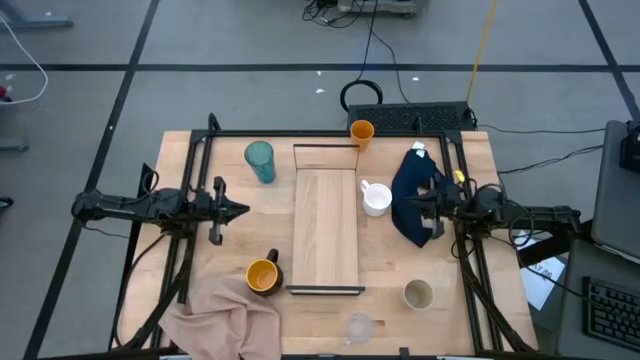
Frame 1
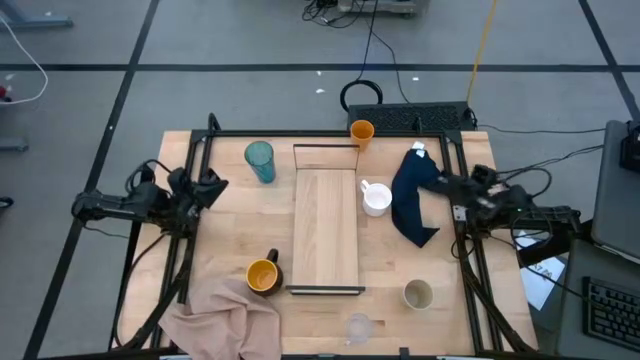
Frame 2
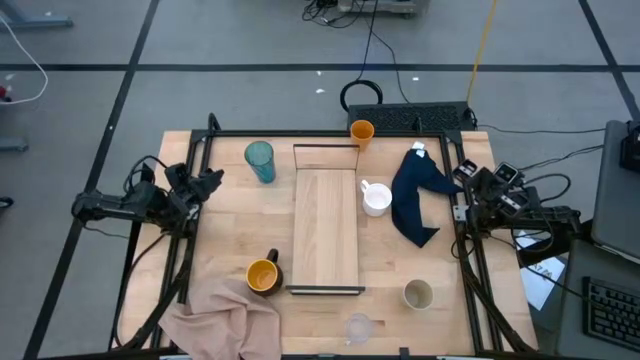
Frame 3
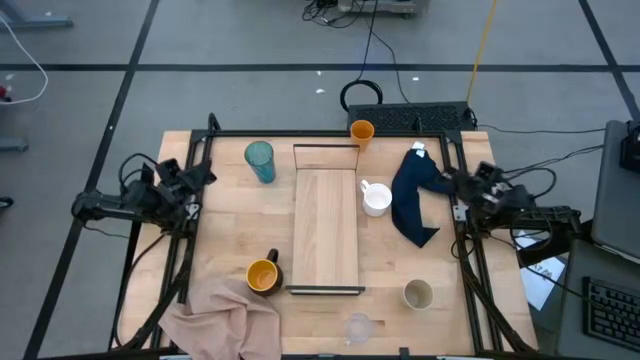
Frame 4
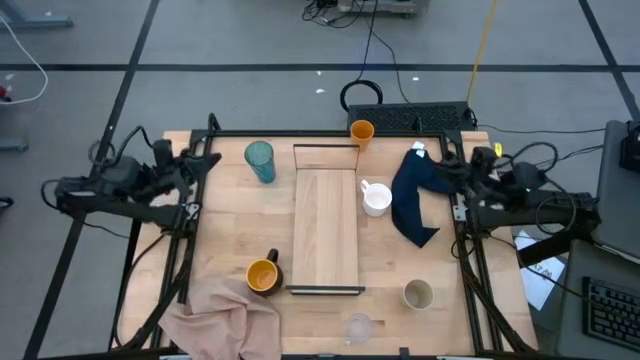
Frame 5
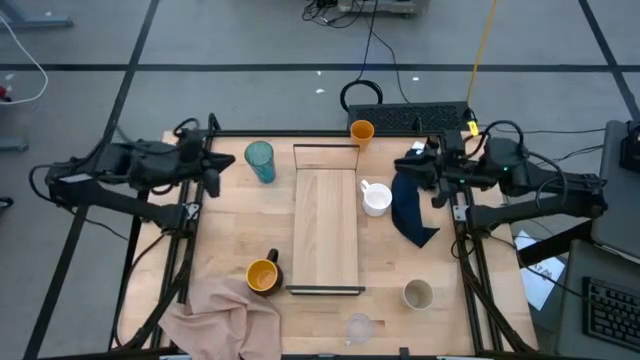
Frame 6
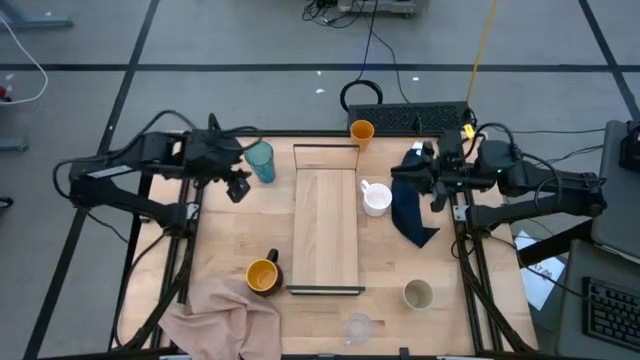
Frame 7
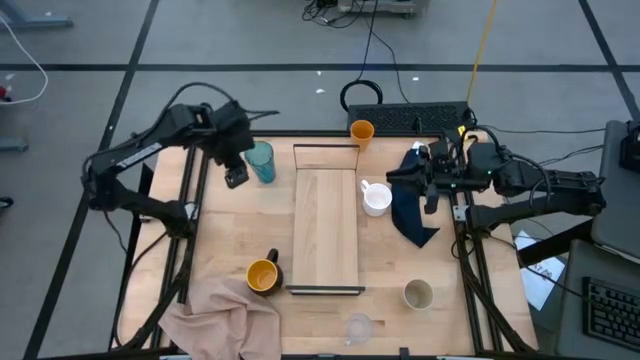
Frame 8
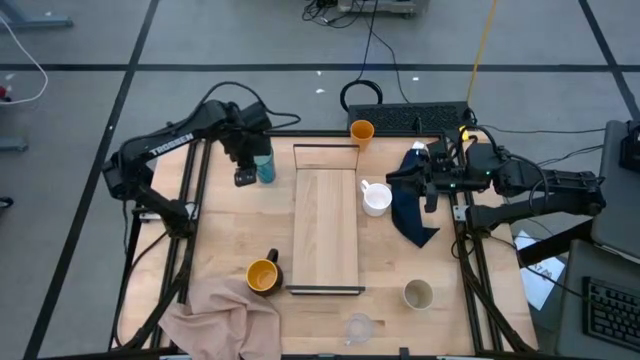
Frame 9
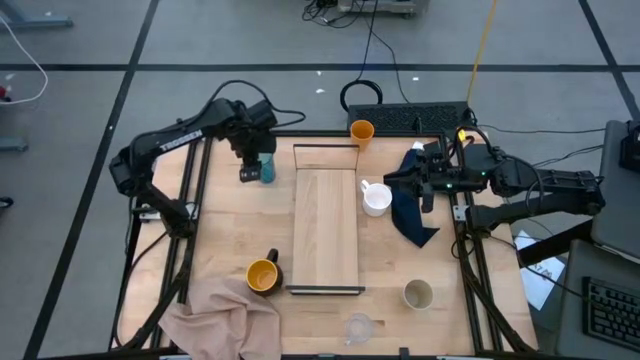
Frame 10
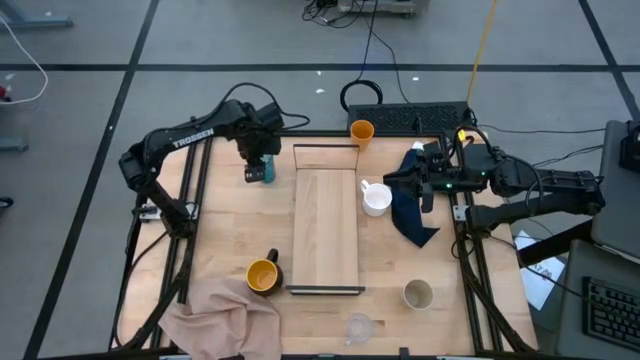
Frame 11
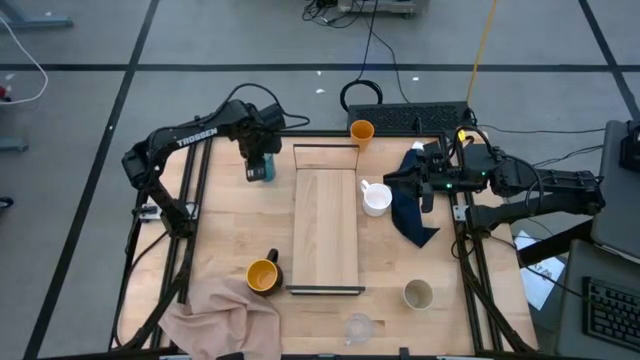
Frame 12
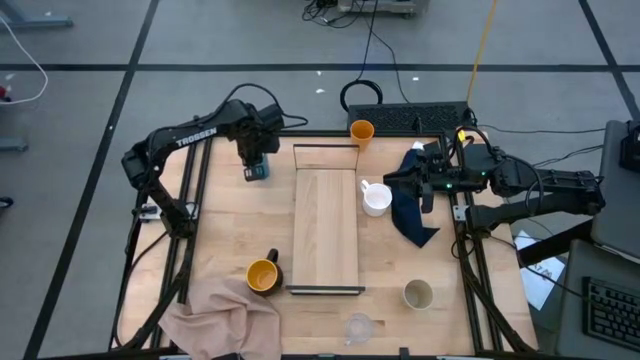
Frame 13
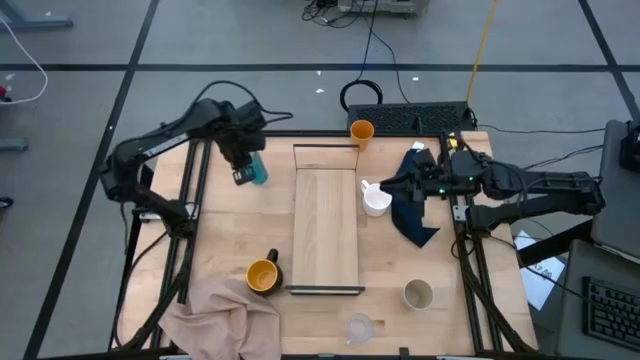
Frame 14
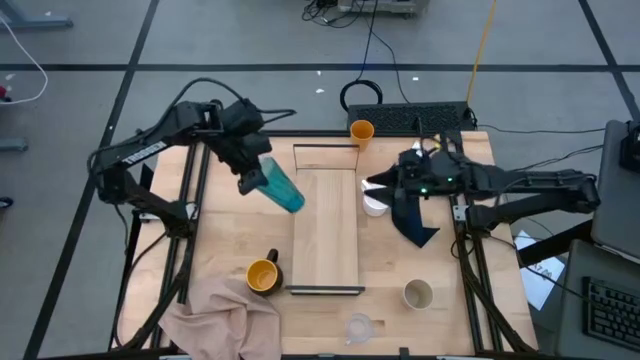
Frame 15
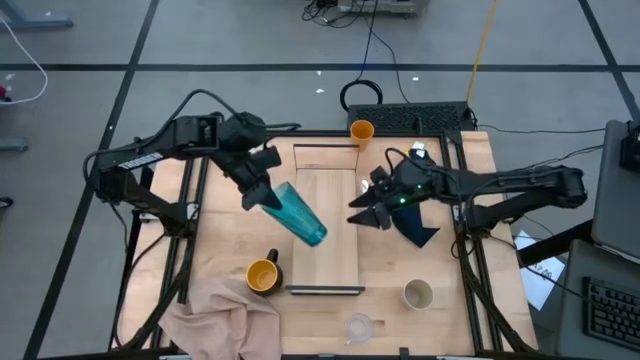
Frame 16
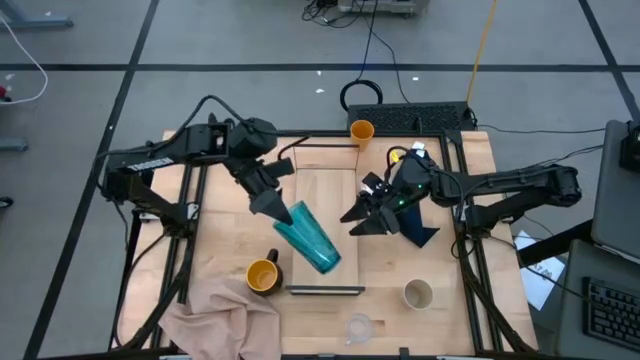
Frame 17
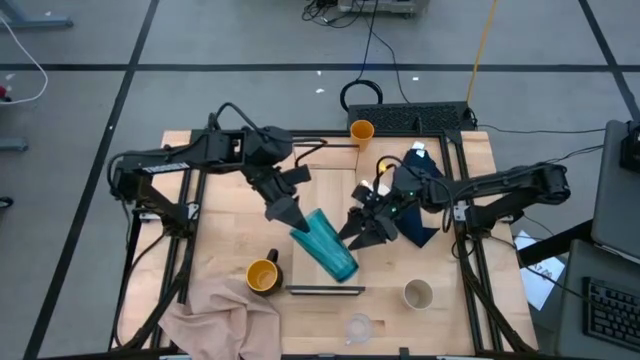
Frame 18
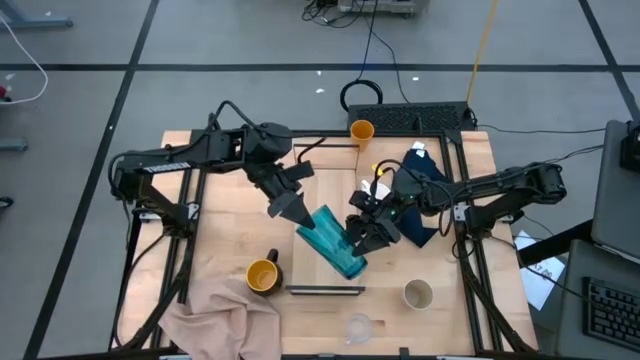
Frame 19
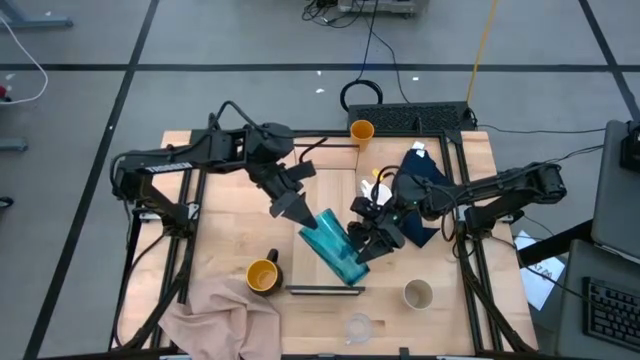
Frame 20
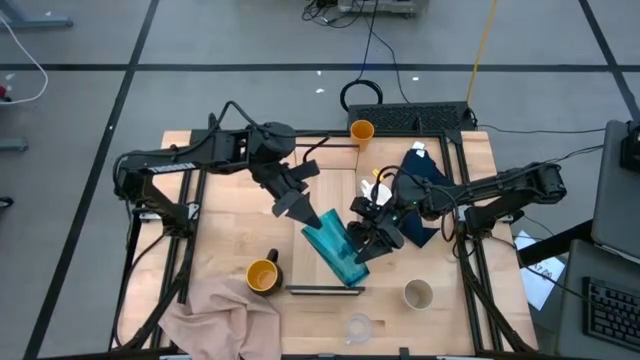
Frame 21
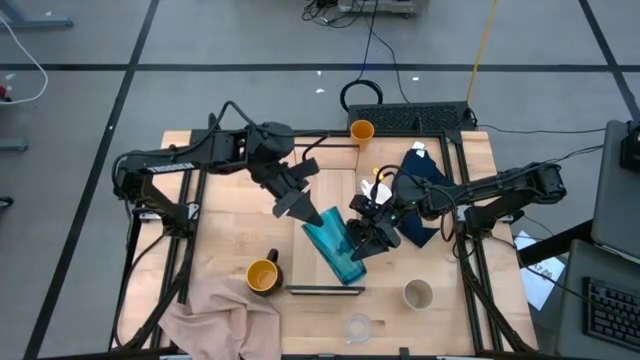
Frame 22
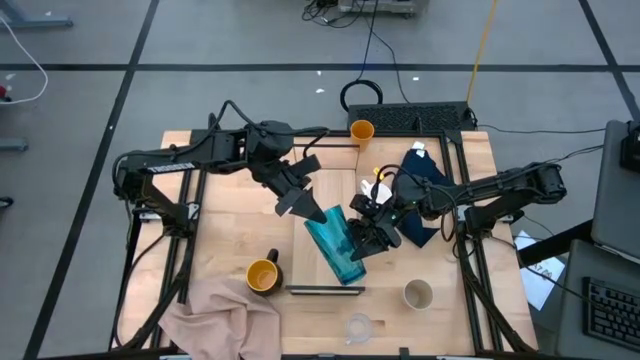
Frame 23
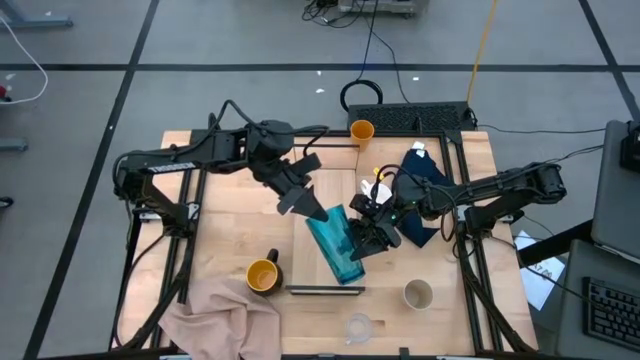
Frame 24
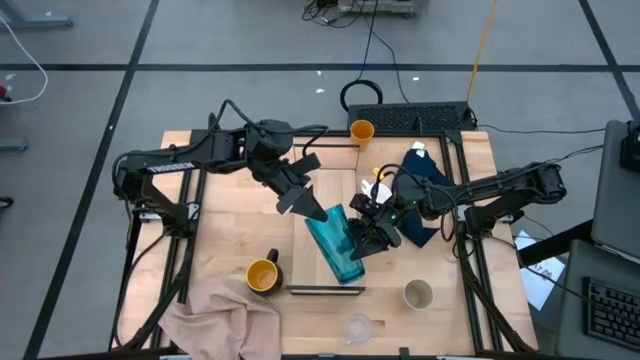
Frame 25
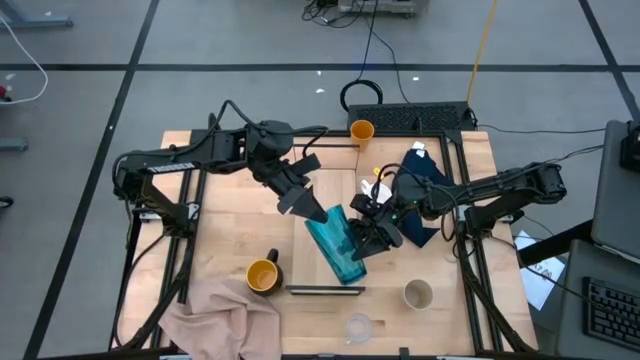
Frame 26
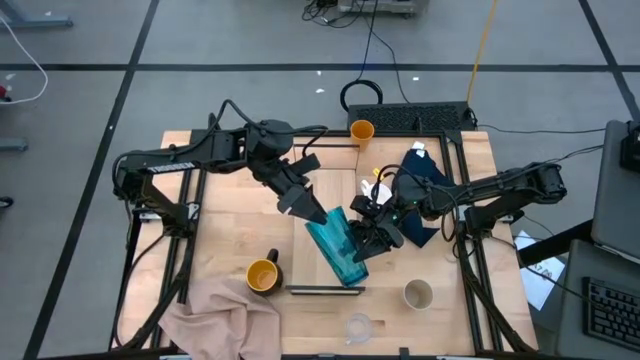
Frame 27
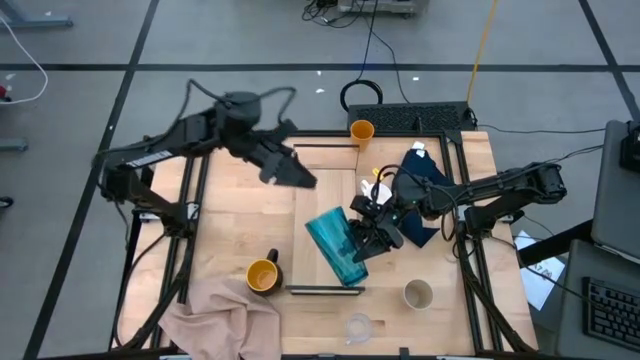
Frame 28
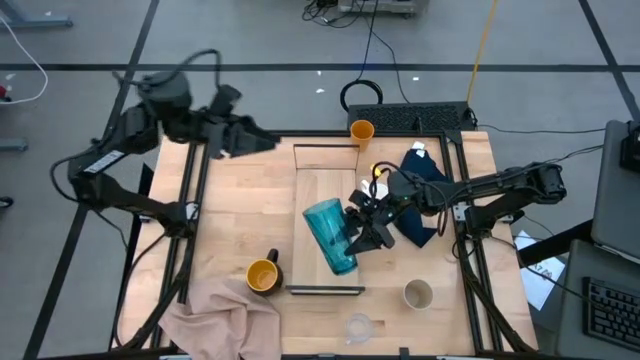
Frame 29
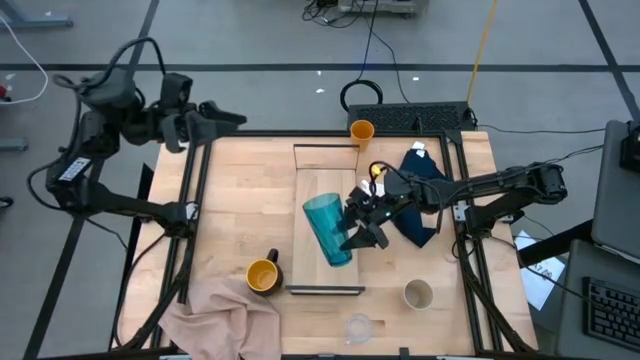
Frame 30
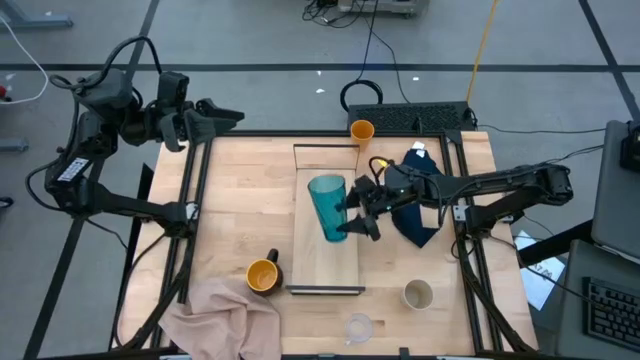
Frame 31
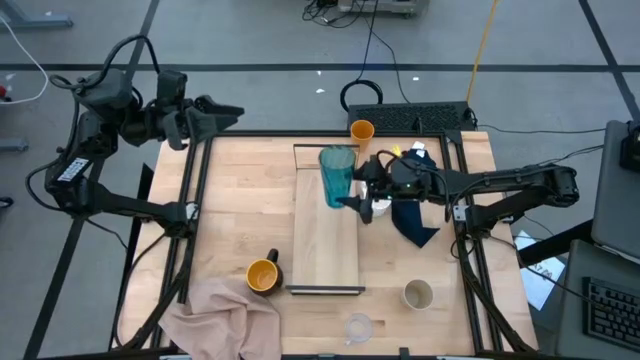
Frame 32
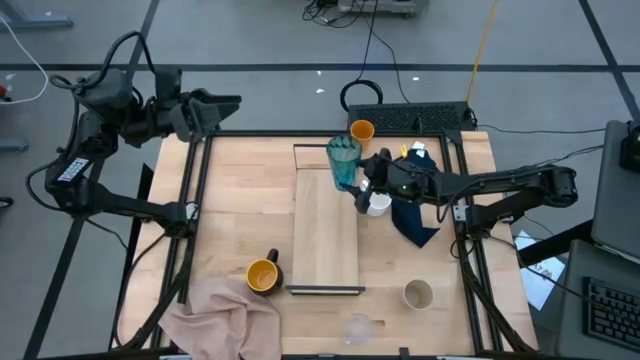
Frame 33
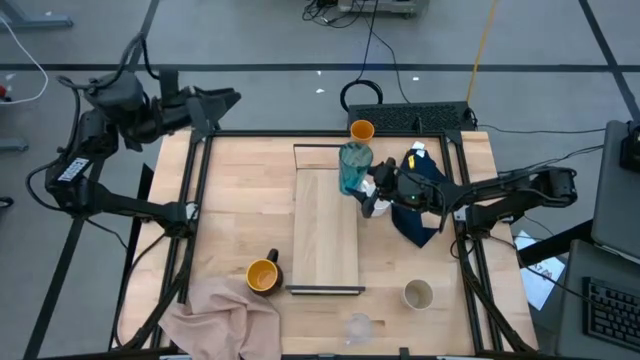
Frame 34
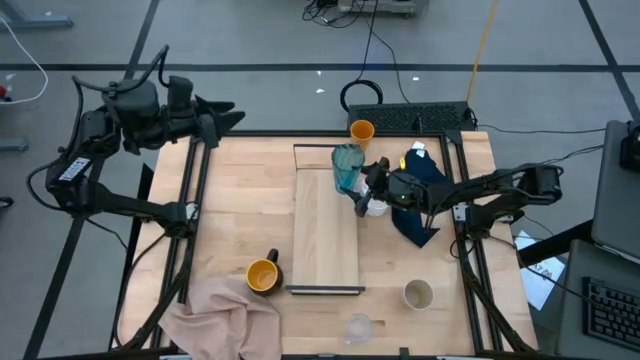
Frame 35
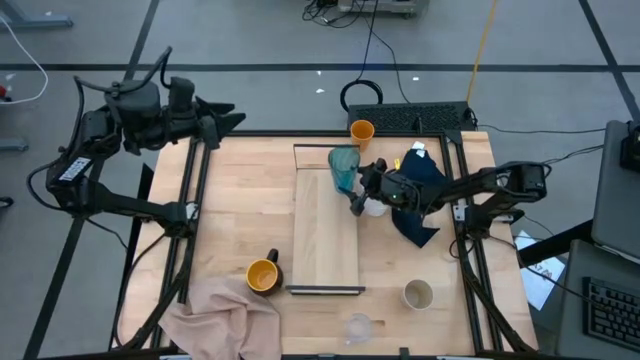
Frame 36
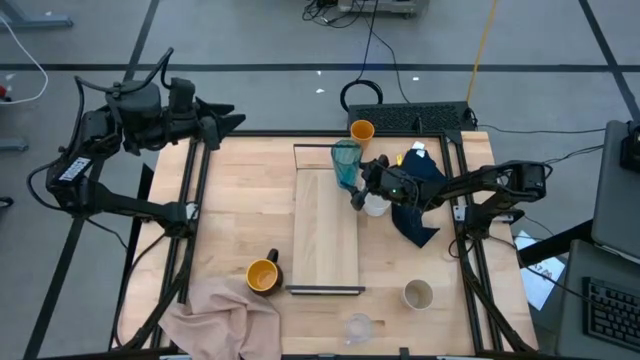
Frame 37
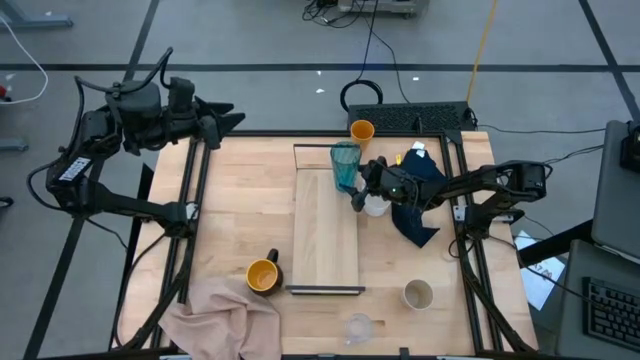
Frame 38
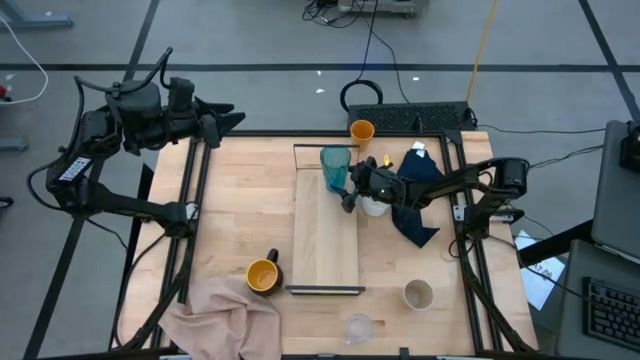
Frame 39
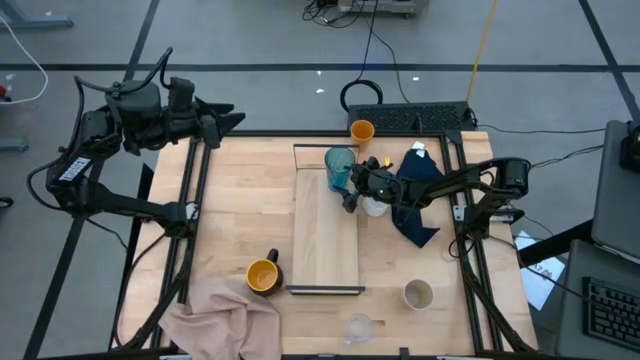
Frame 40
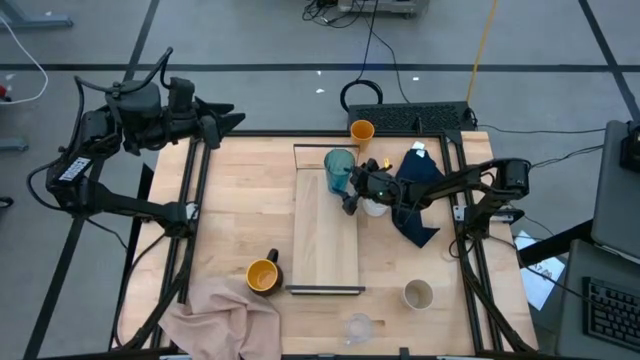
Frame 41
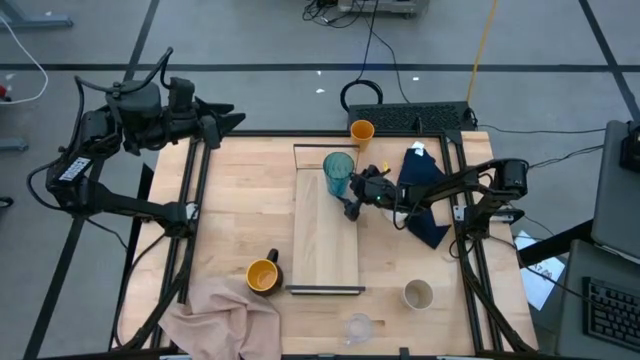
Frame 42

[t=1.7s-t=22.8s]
Task: Stack small to large cups/mugs on shelf
Put the blue cup on the shelf
